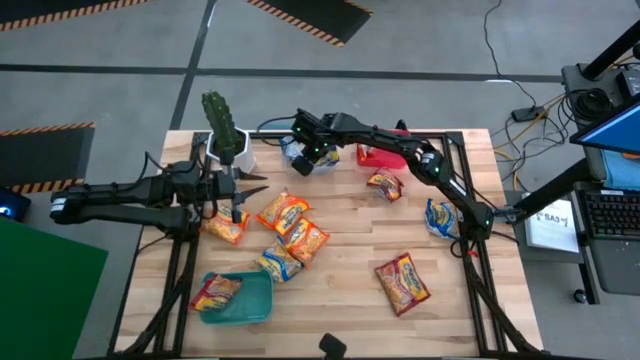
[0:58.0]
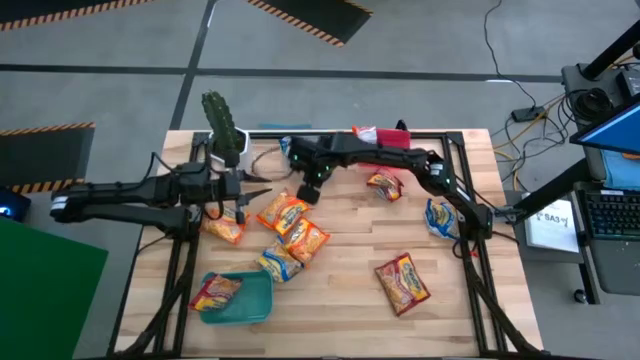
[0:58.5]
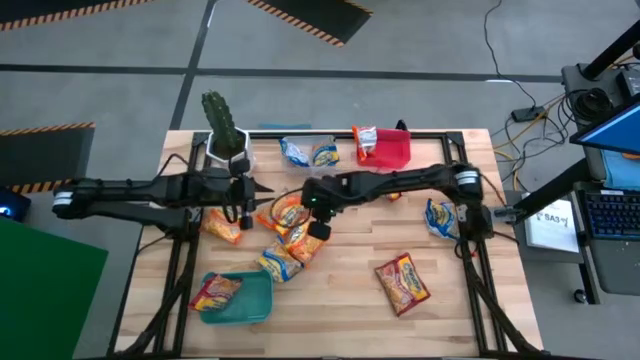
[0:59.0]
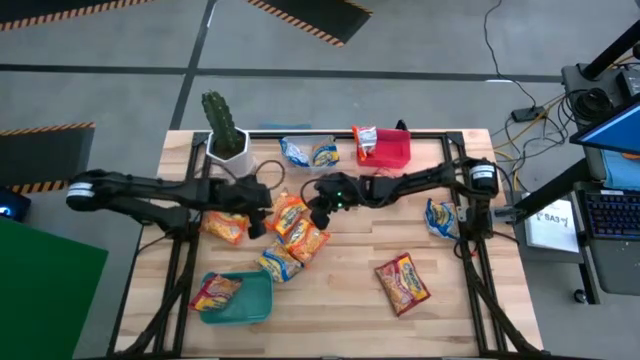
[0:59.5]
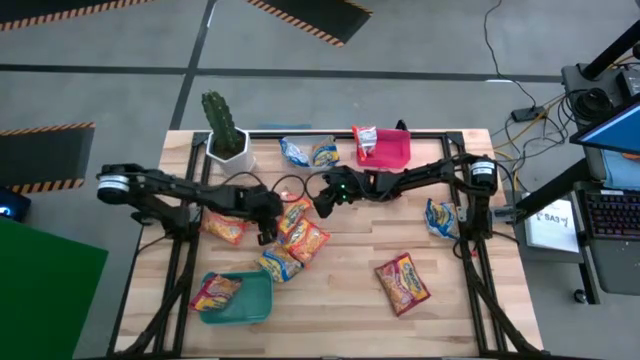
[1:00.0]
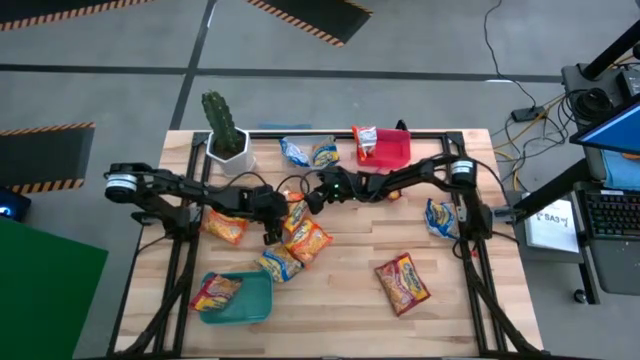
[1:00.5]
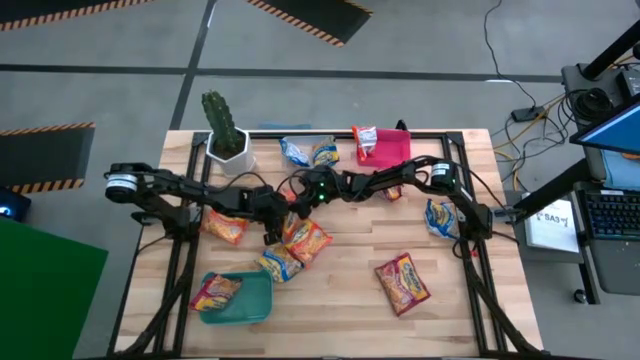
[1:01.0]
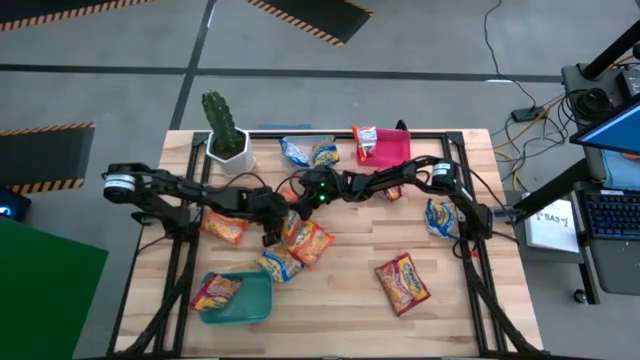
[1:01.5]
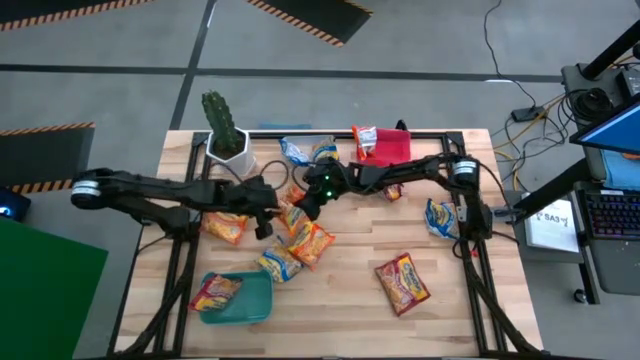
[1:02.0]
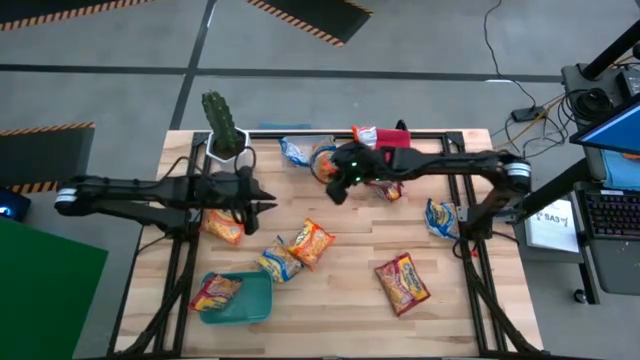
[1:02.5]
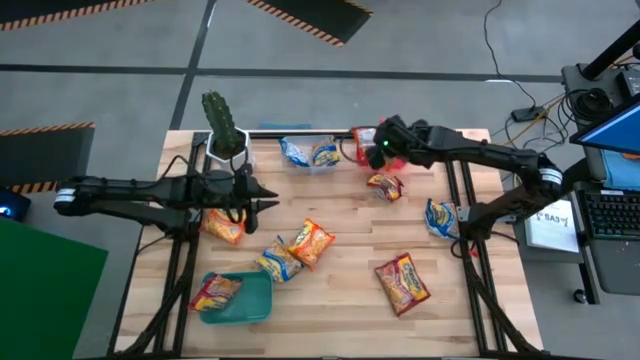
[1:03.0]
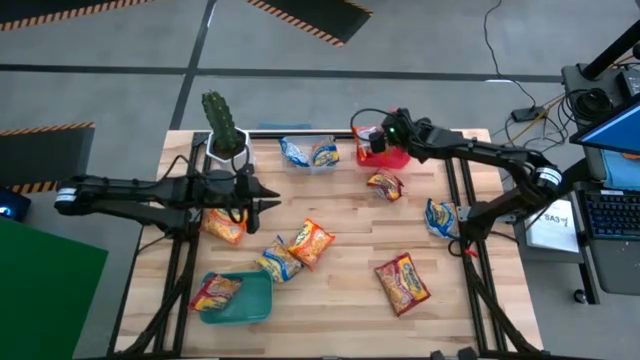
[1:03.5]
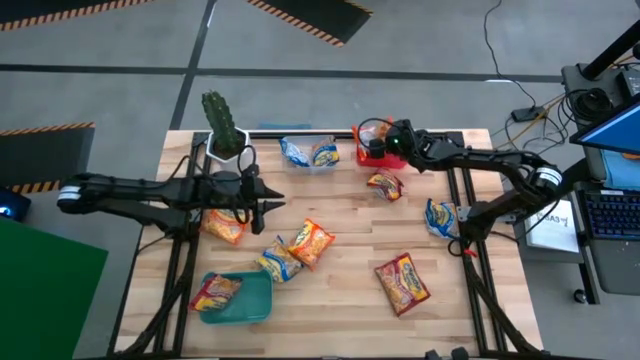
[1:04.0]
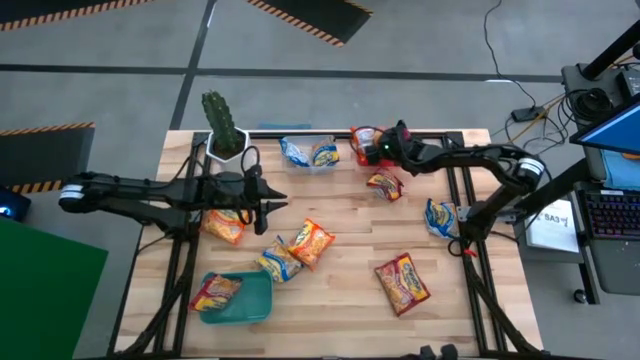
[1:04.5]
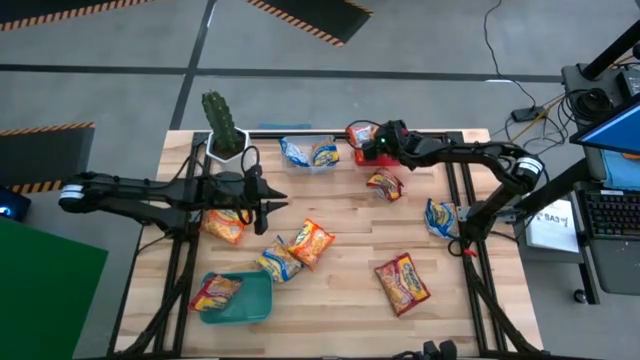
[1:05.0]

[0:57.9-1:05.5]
Task: Sort Maruchan noodles
Put the orange noodle pack into the red bin

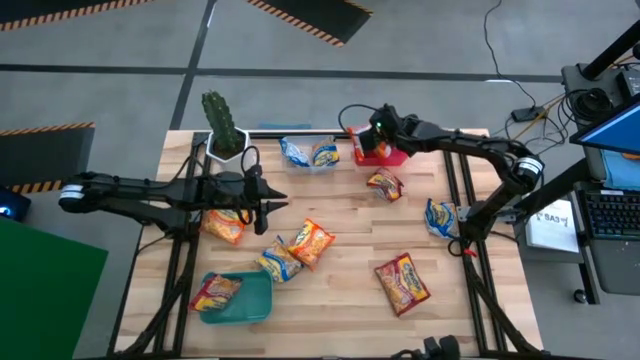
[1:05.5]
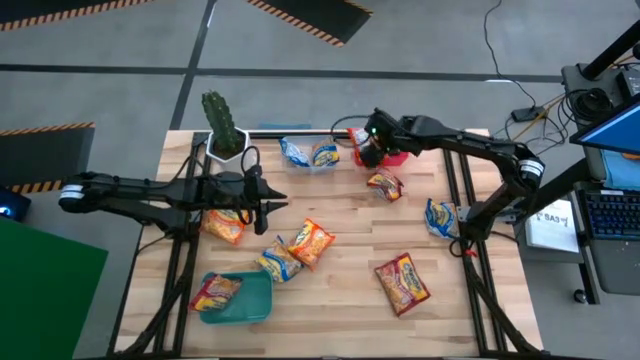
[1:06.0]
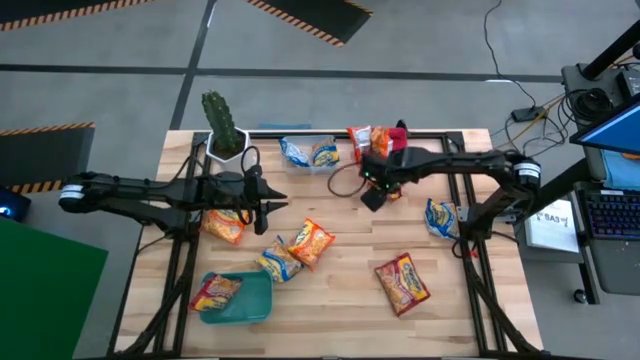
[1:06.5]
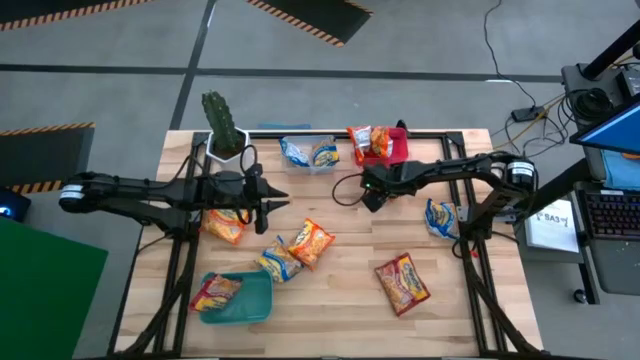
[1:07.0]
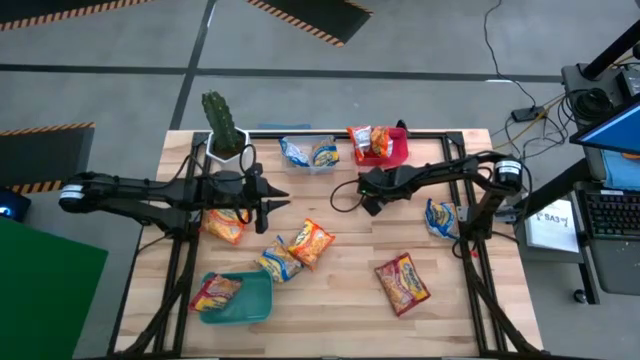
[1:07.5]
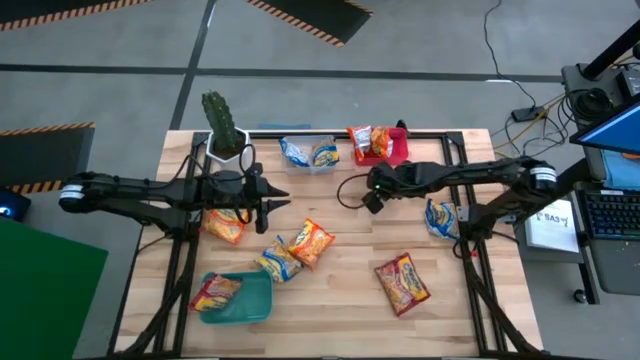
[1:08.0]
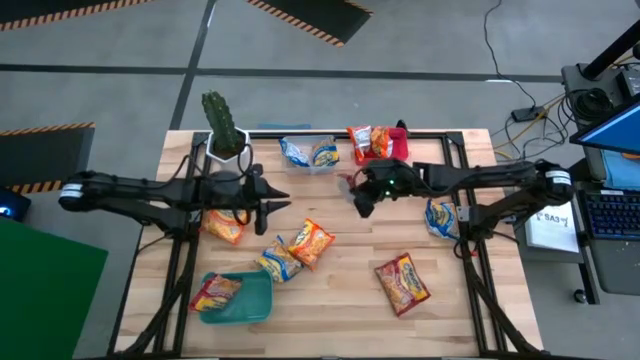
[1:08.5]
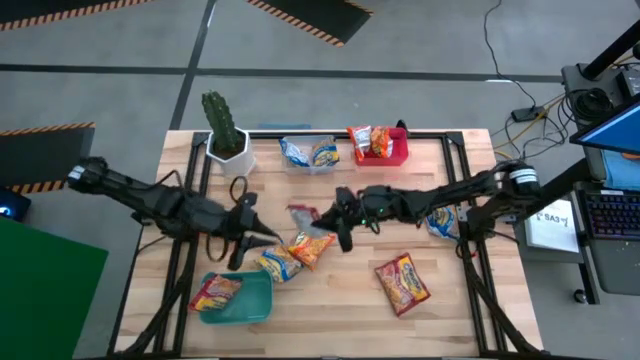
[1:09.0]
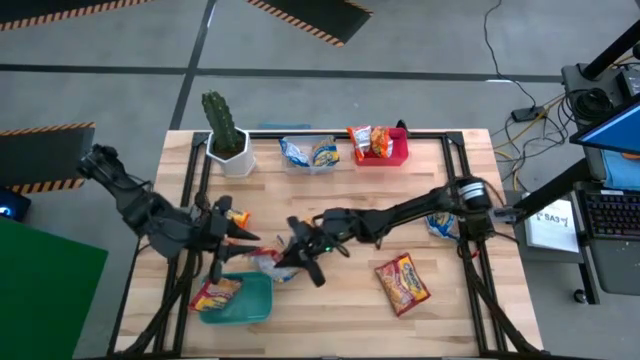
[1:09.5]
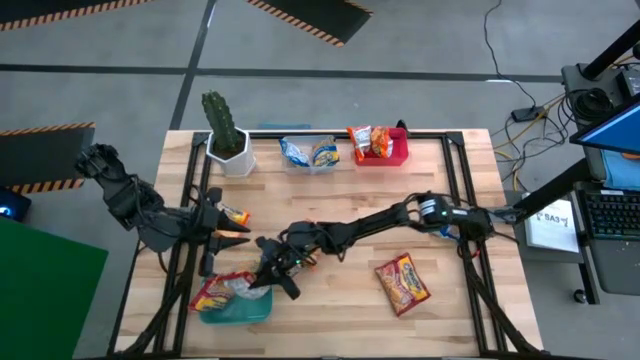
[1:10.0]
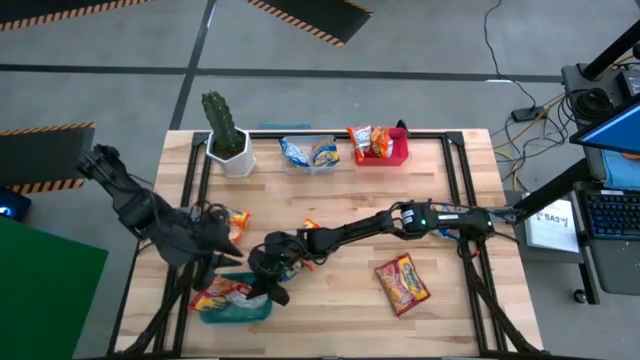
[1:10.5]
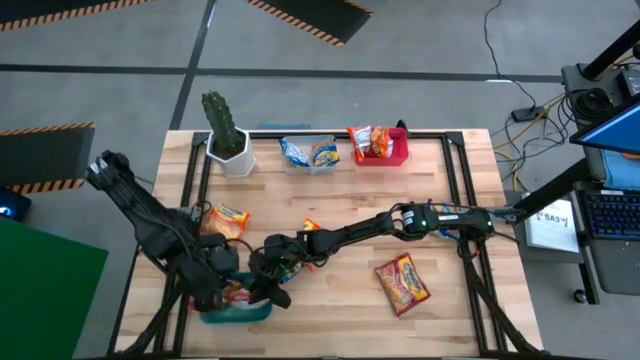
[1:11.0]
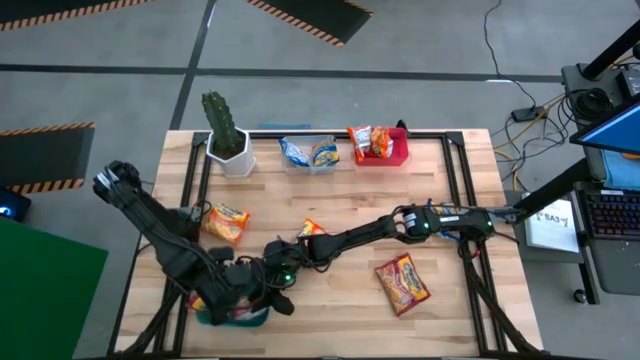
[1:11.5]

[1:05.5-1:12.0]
Put the red noodle pack into the green bin

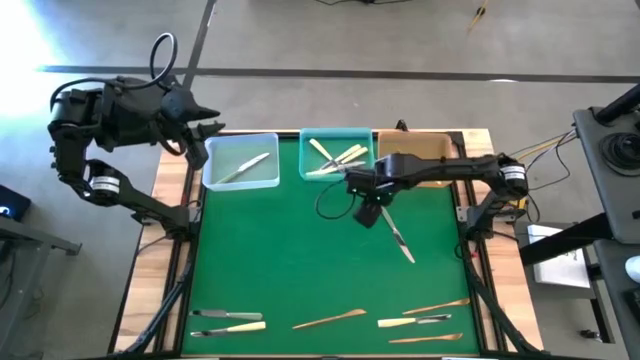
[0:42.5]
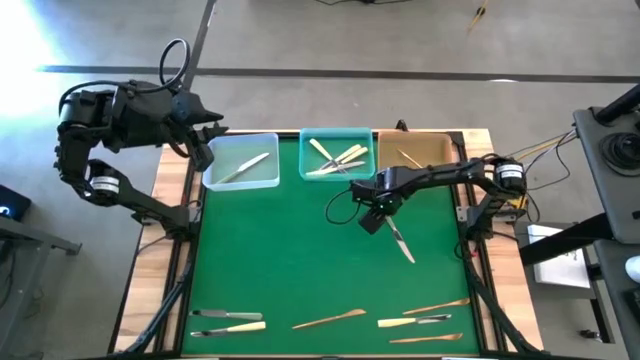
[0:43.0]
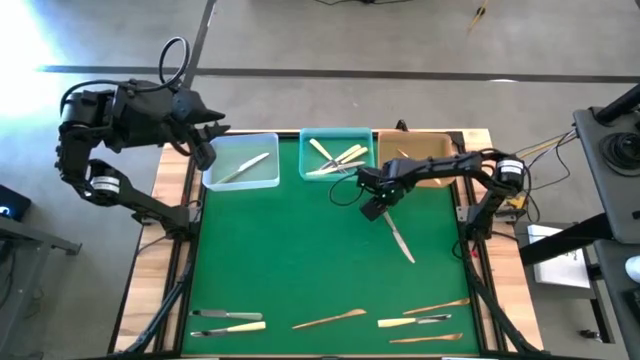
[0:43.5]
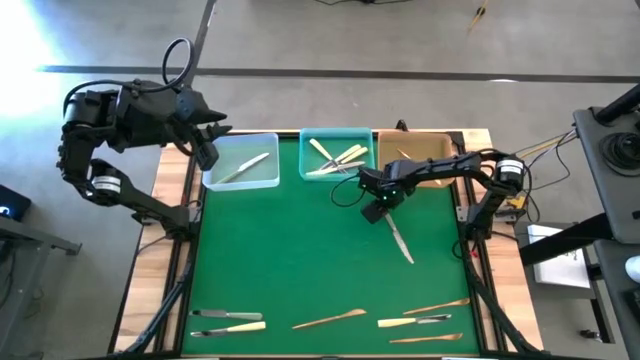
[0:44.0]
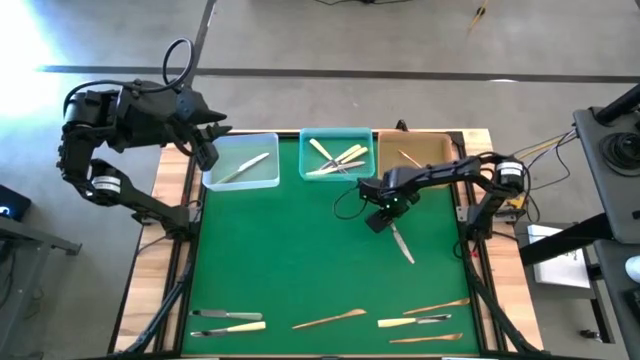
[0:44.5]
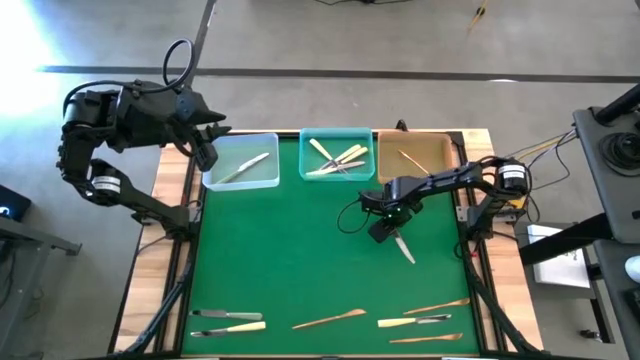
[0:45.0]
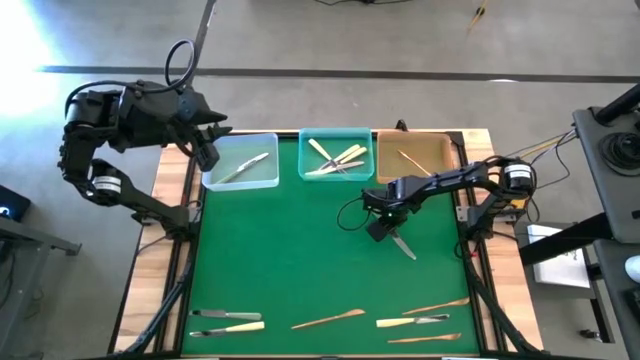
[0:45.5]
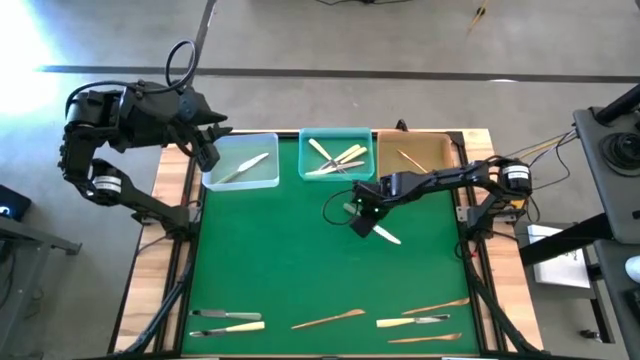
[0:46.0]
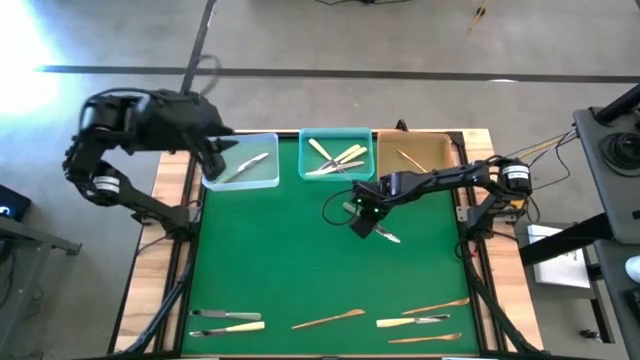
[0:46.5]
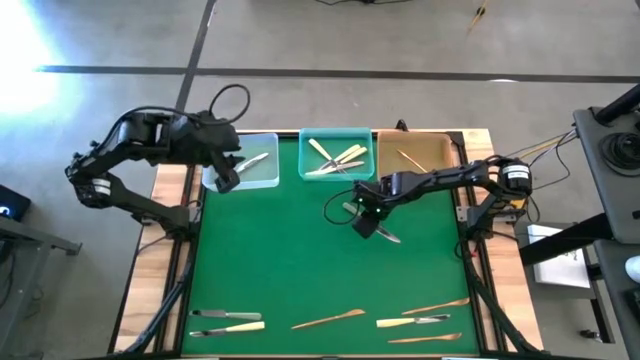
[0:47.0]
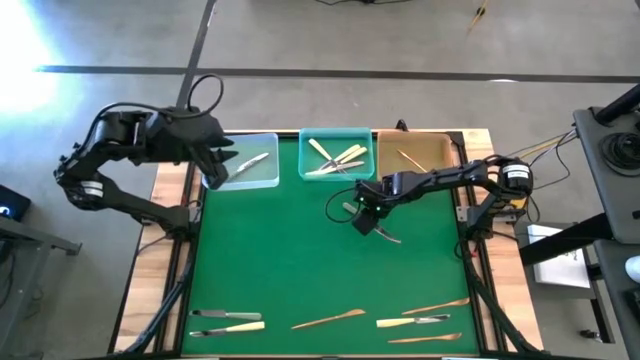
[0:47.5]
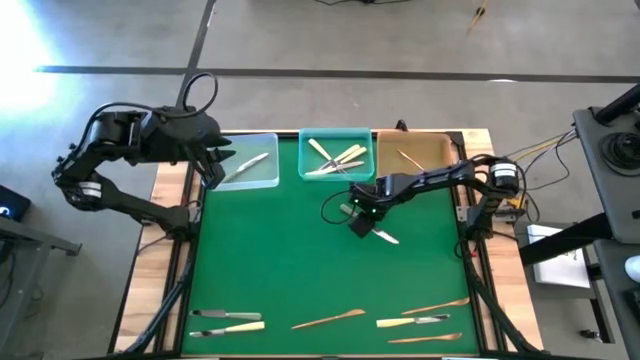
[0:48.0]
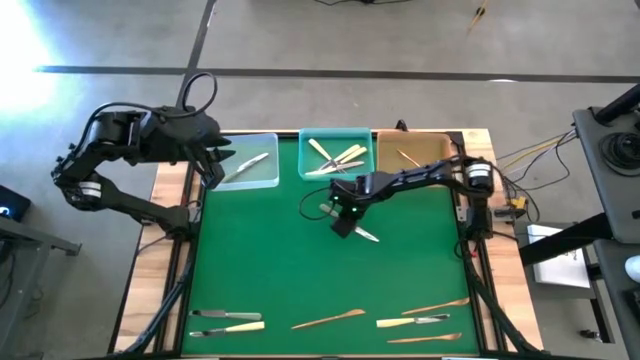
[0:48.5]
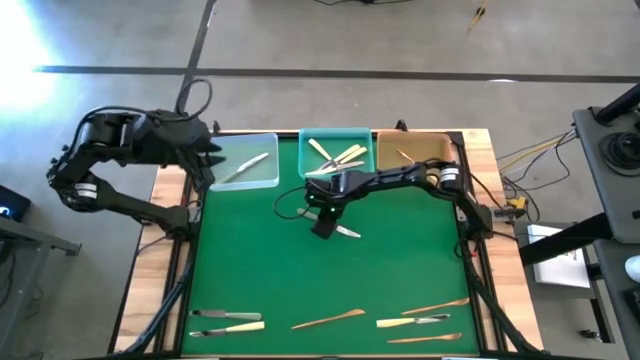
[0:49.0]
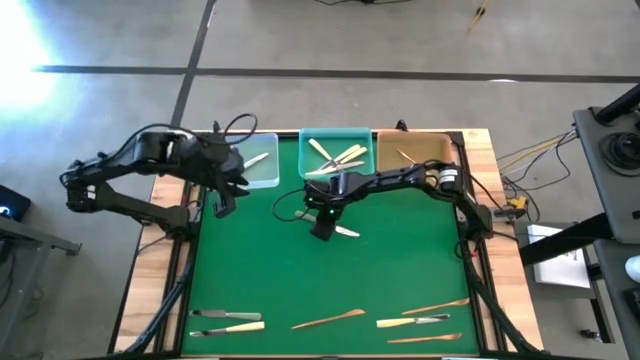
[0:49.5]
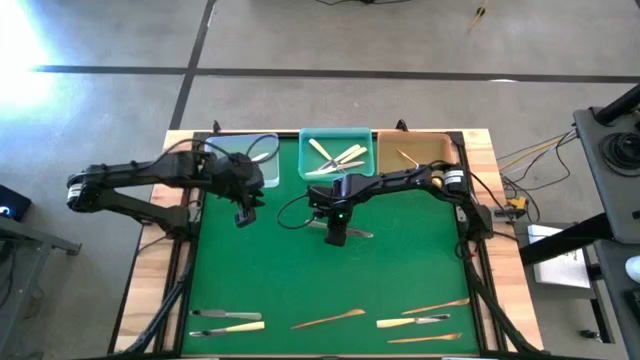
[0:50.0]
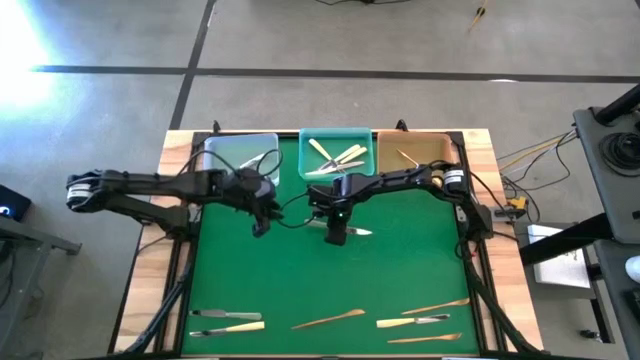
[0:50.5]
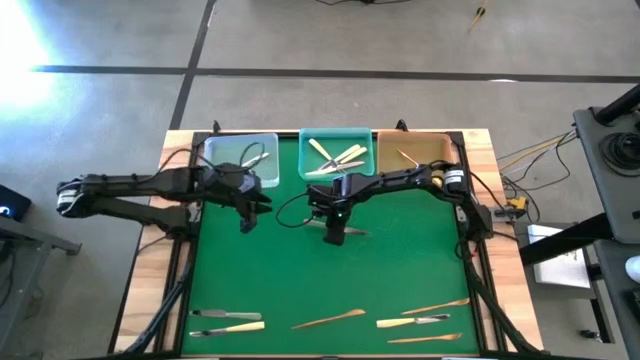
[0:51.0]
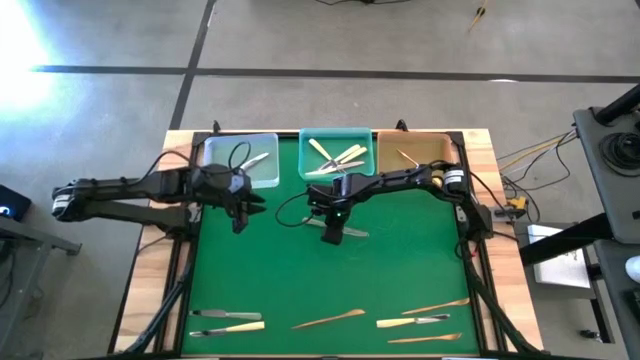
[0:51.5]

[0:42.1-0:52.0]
Task: Sort silverware by color (type)
Put the top silver knife into the transparent bin
